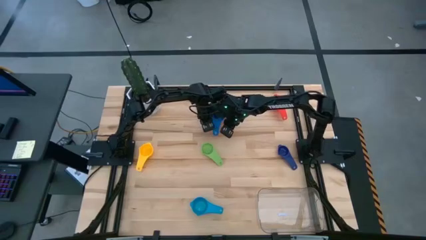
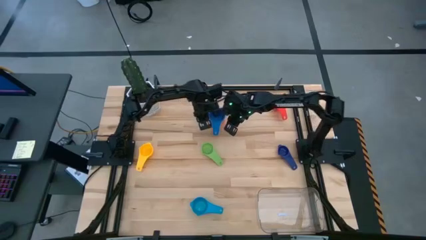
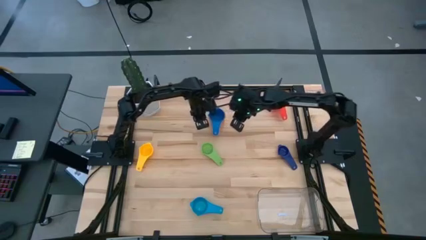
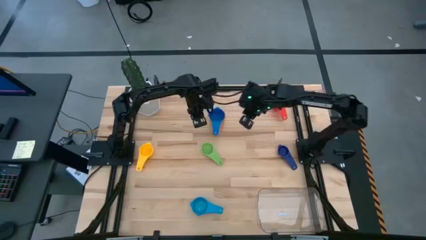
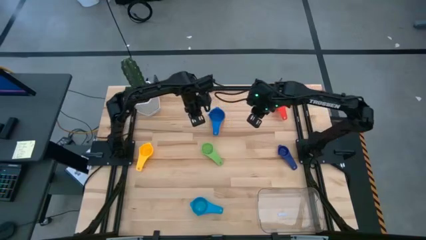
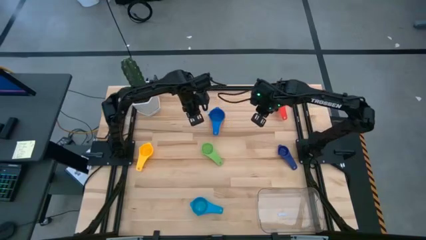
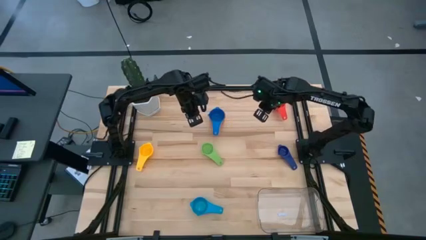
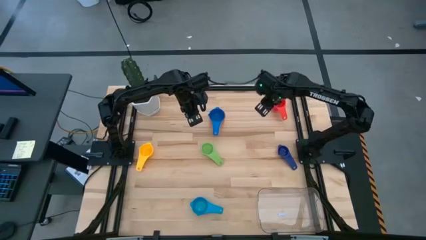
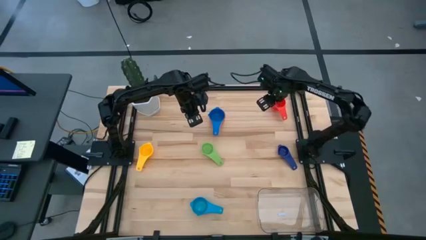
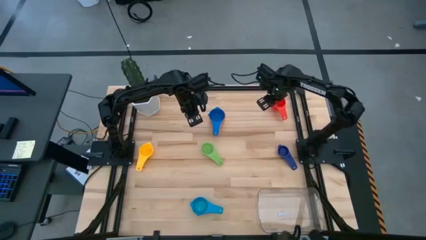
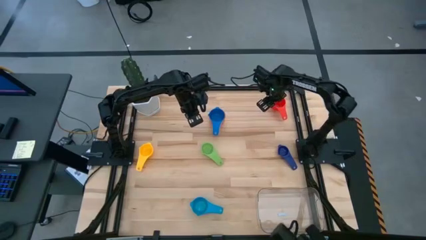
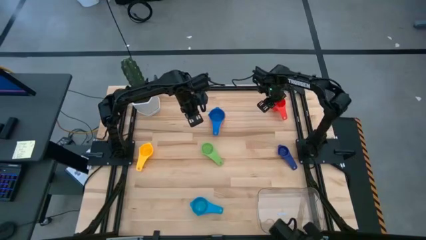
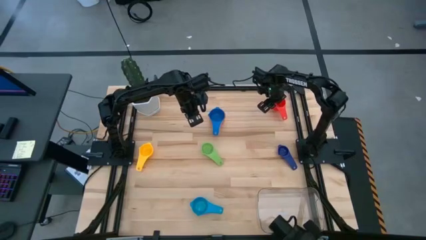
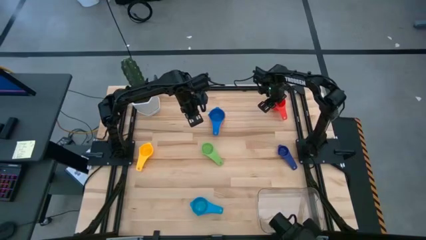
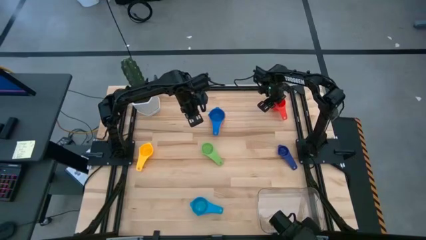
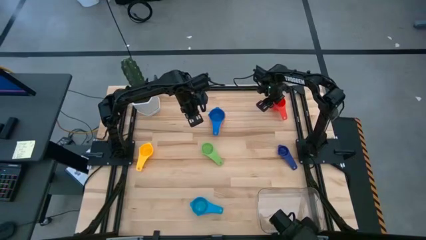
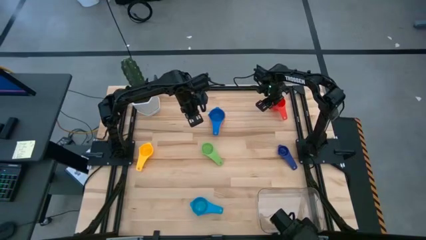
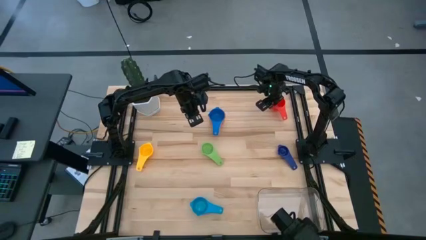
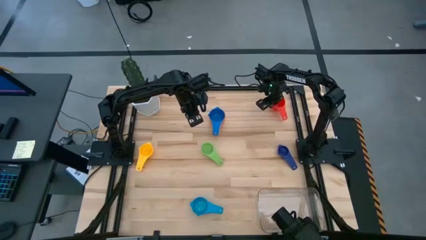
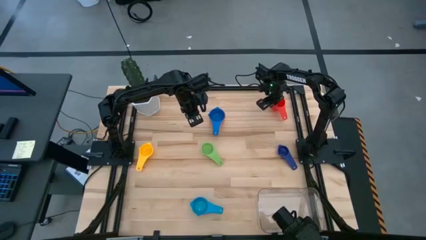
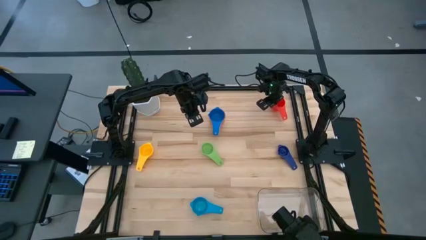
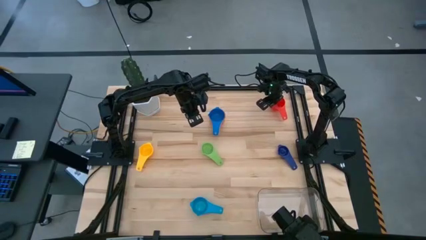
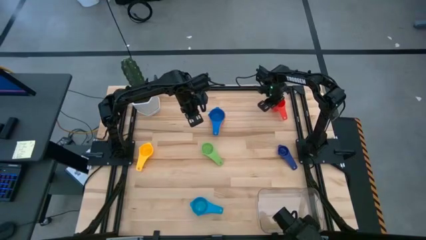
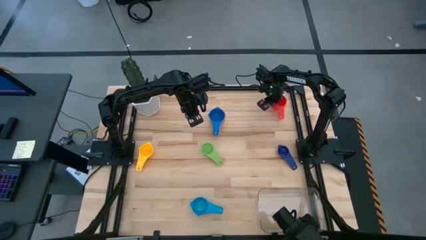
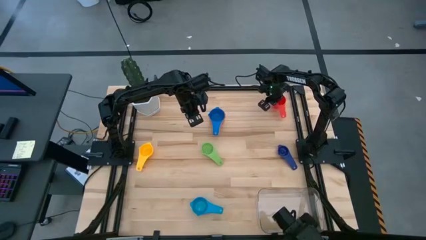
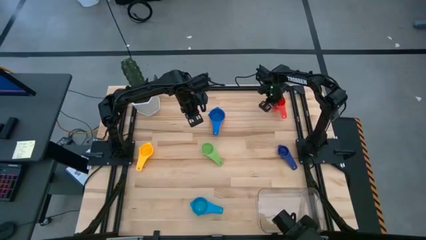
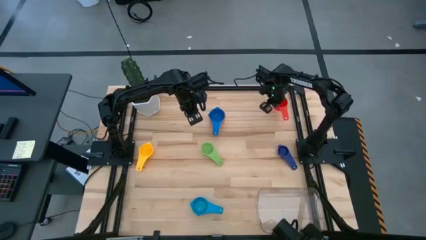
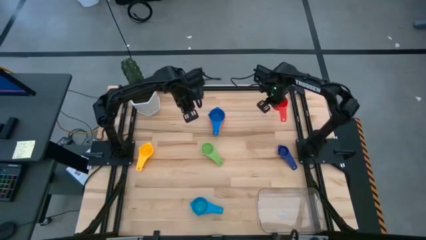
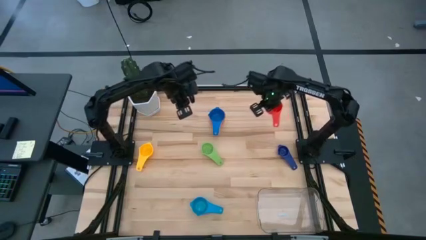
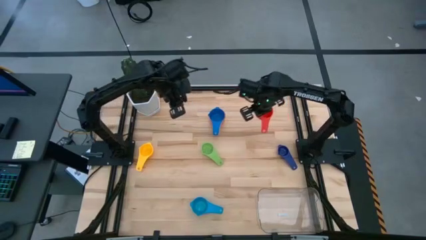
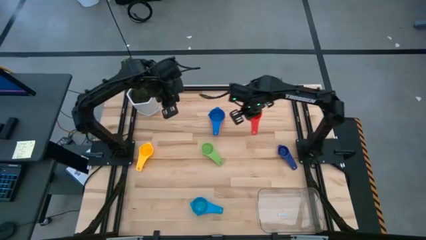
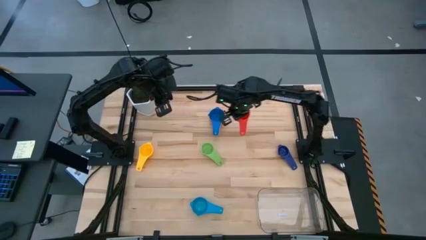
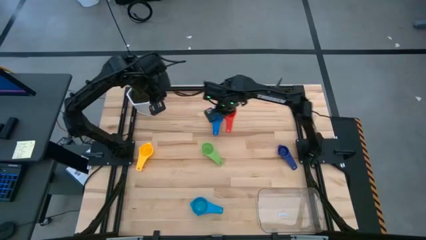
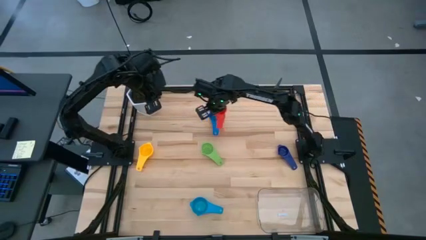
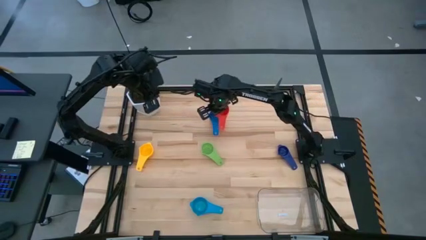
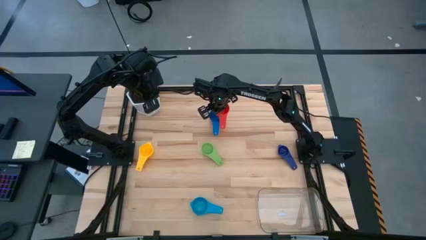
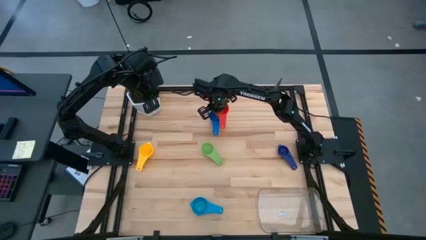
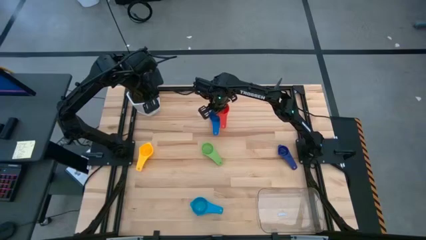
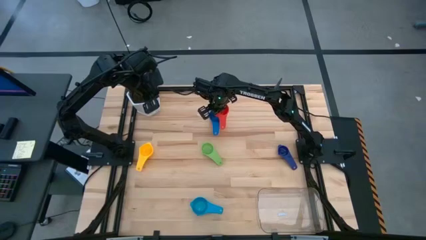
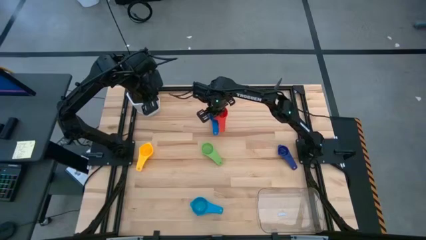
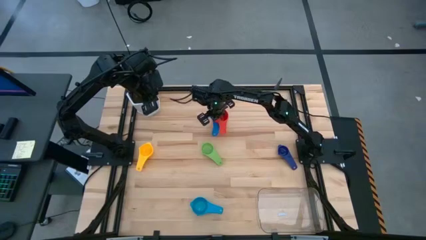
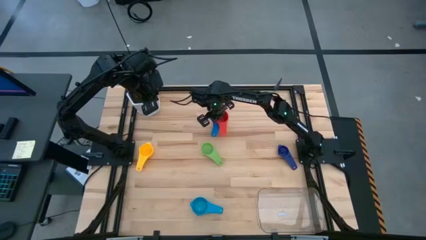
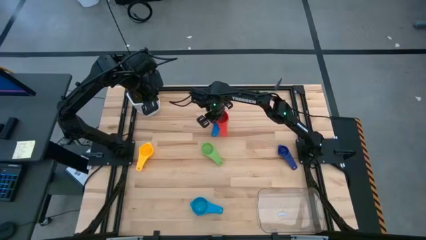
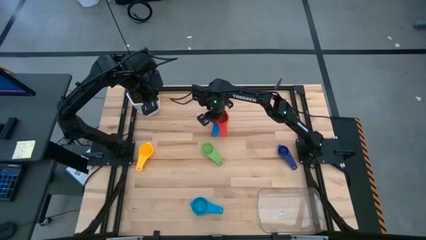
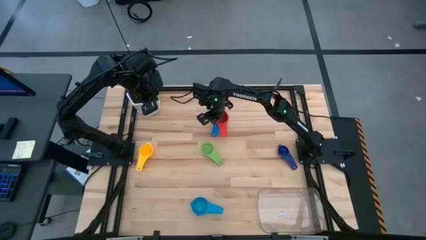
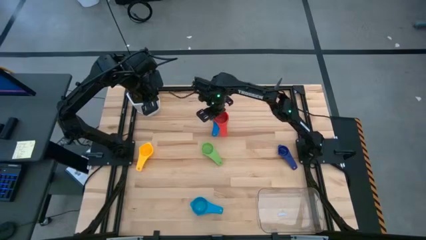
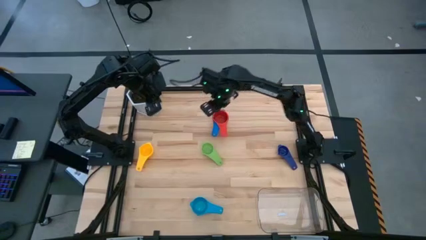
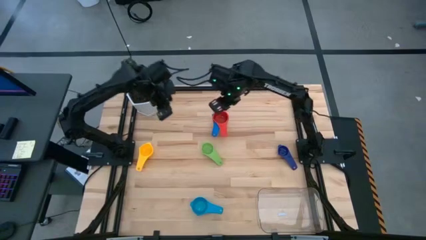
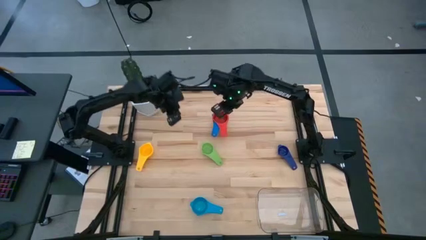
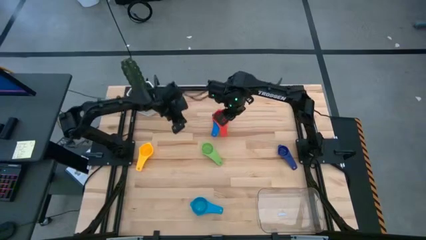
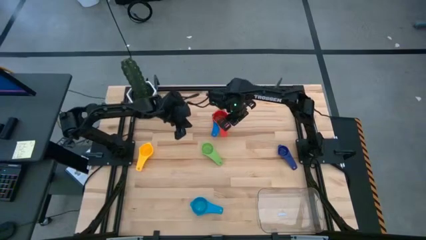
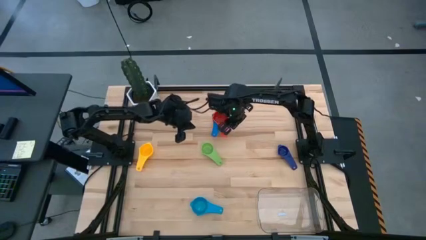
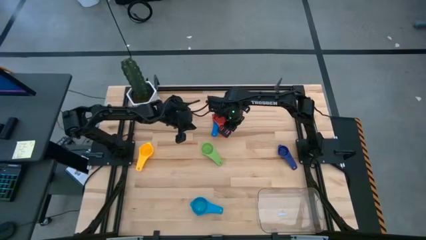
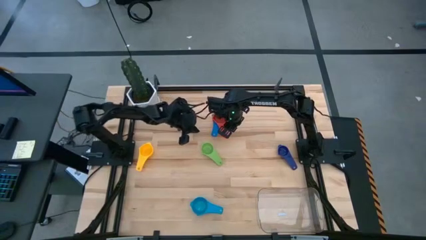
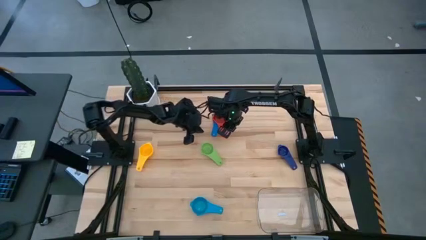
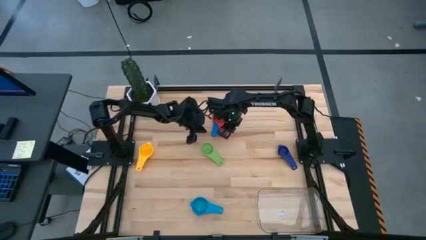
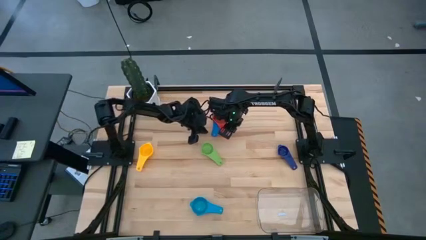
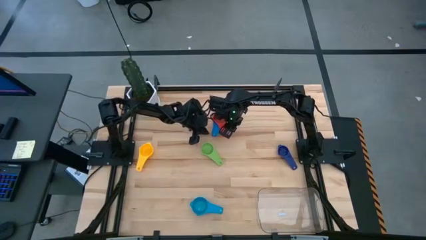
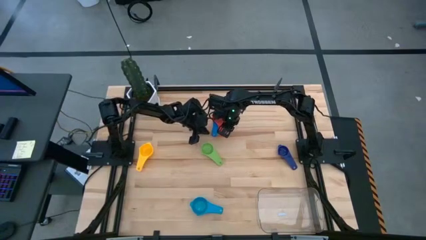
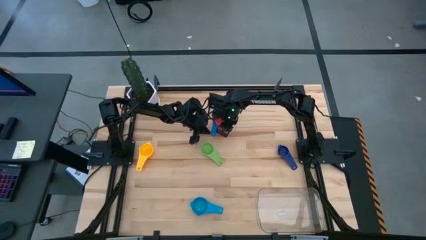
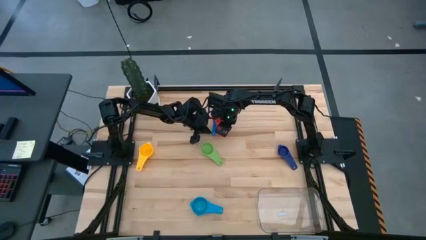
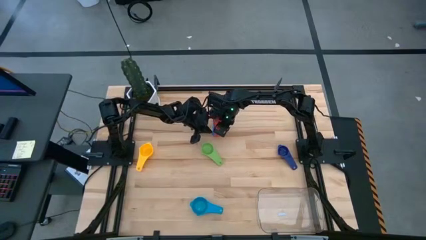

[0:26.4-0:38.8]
Task: Nest measuring cups in basket
Stack the red measuring cup on top of the dark blue measuring cup

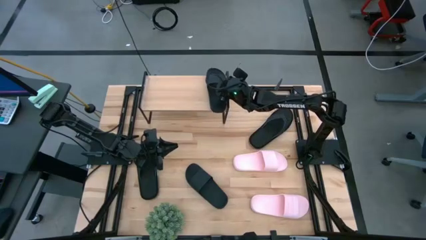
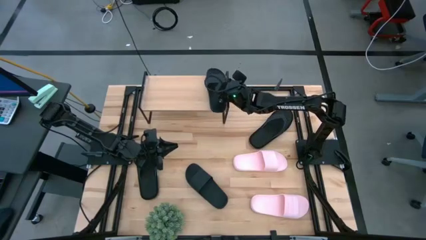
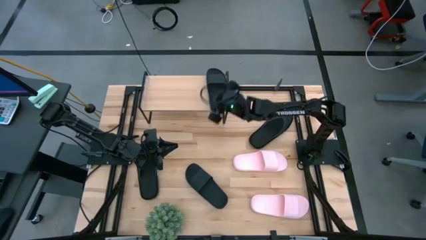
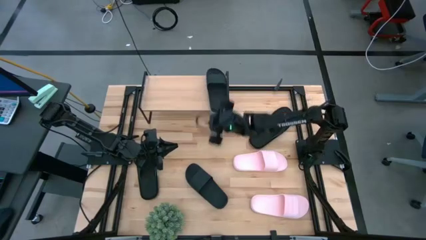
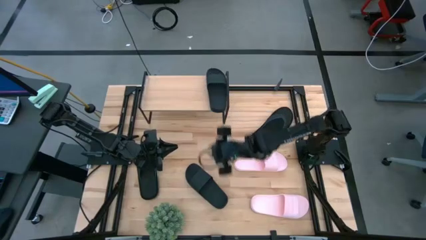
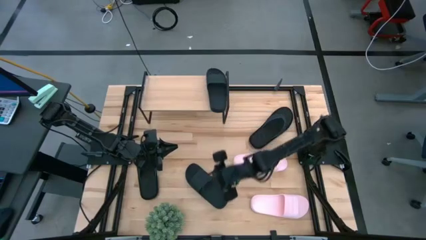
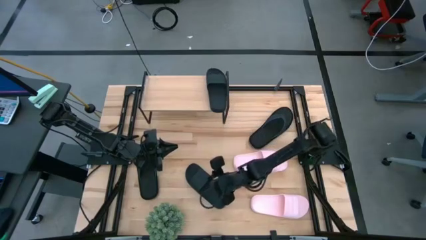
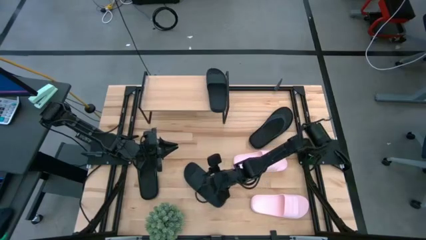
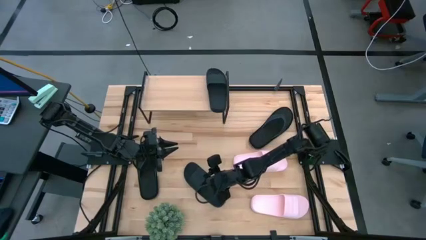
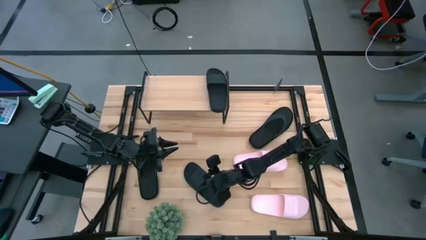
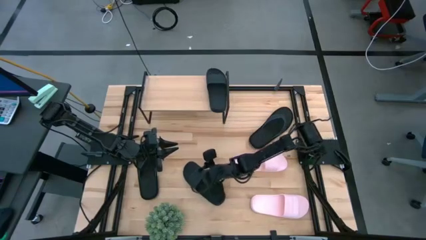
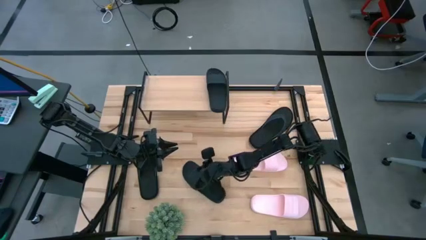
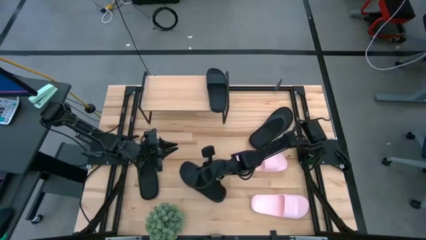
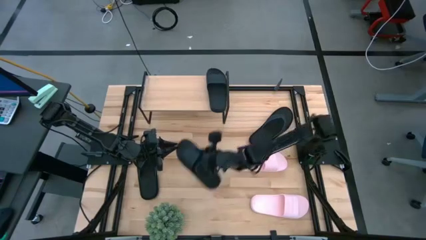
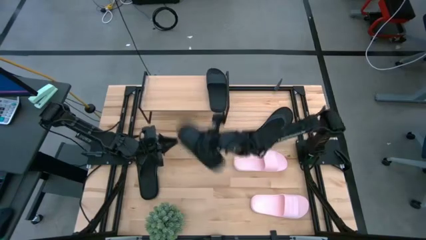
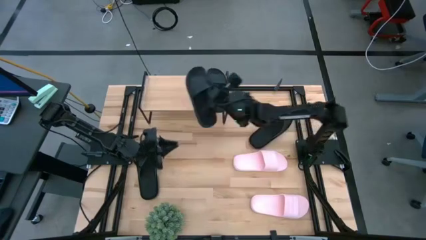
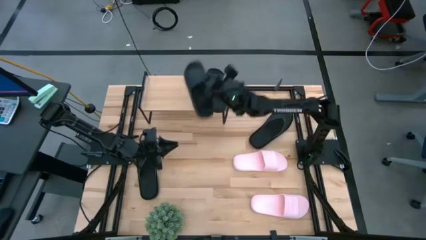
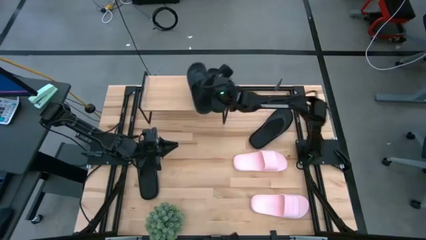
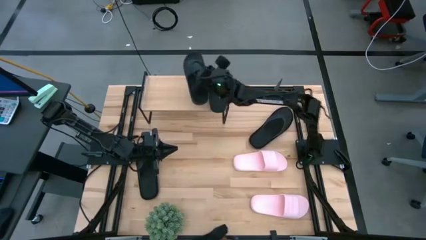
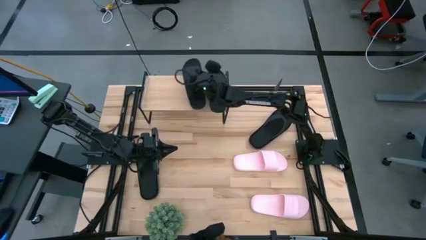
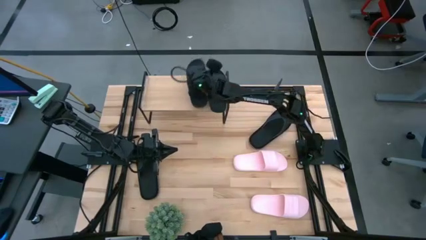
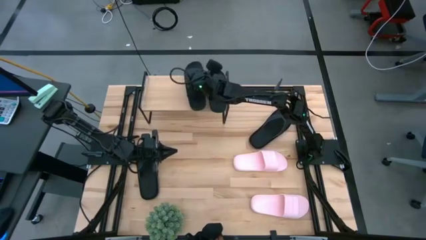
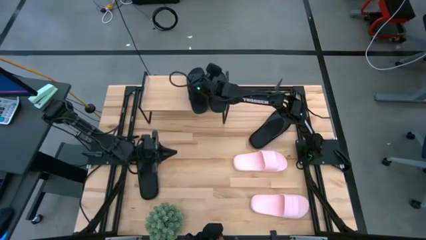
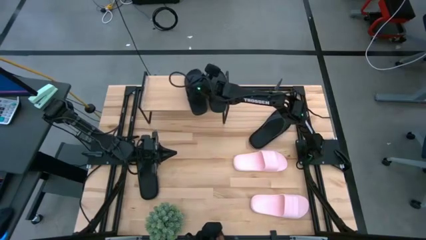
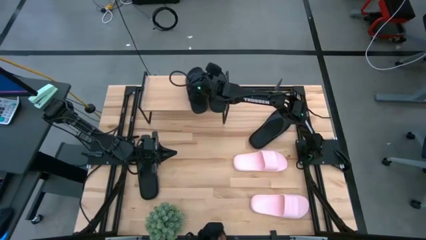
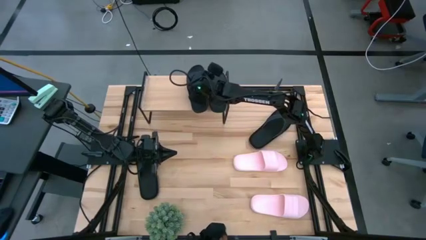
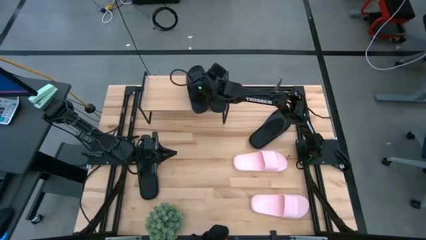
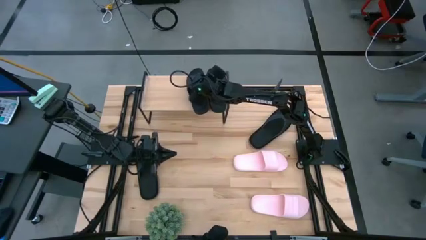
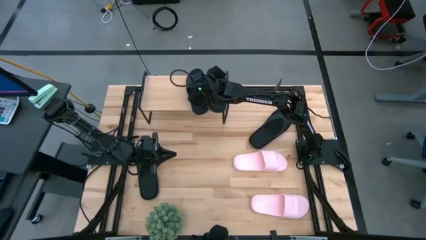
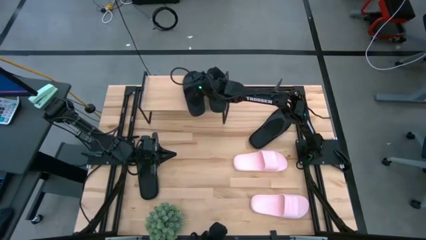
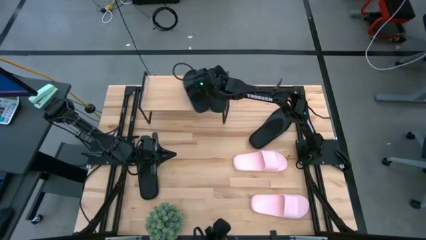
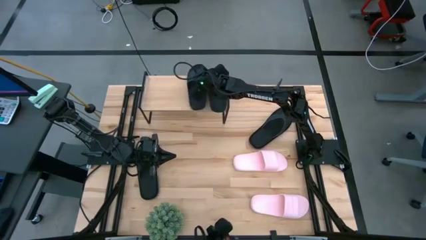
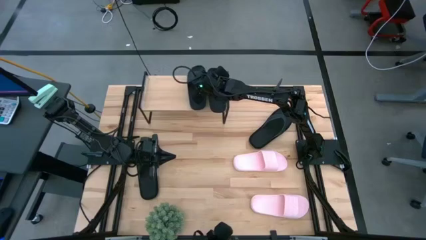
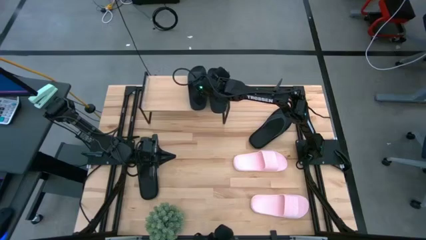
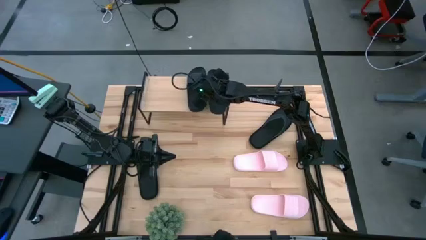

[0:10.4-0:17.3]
Task: Pick and place slides into the shelf
Put the black slide on the shelf
